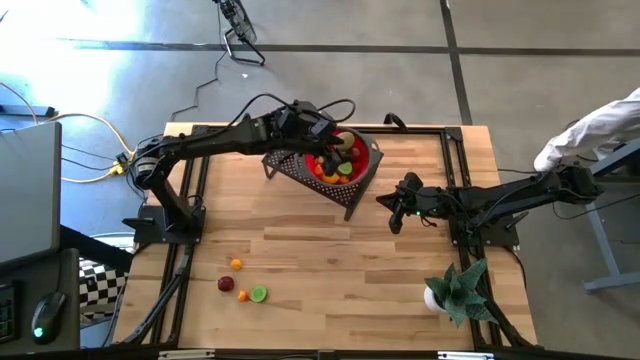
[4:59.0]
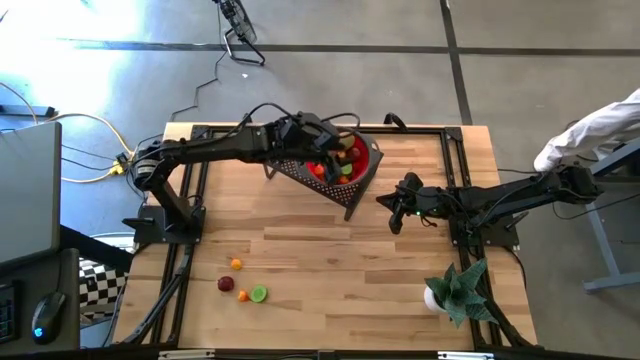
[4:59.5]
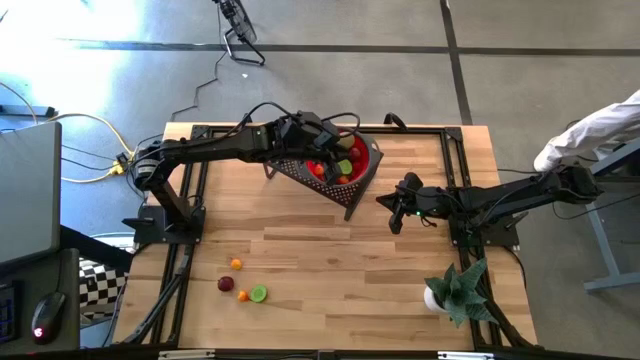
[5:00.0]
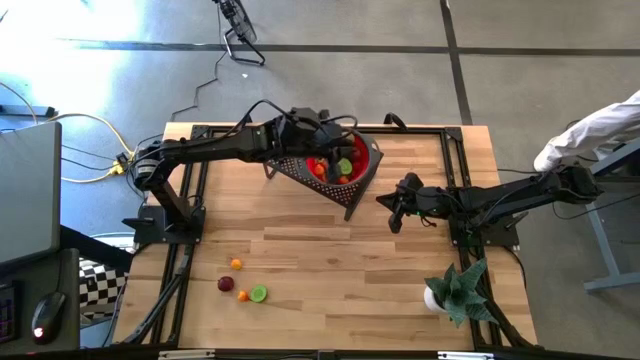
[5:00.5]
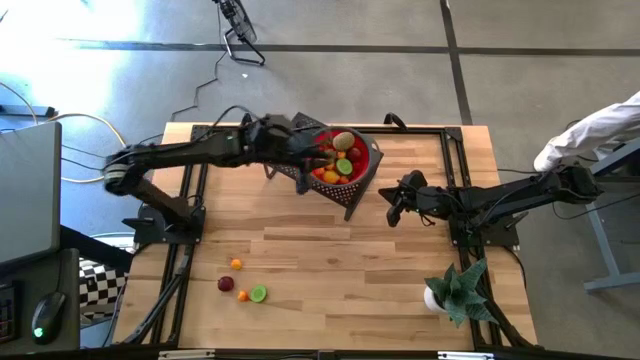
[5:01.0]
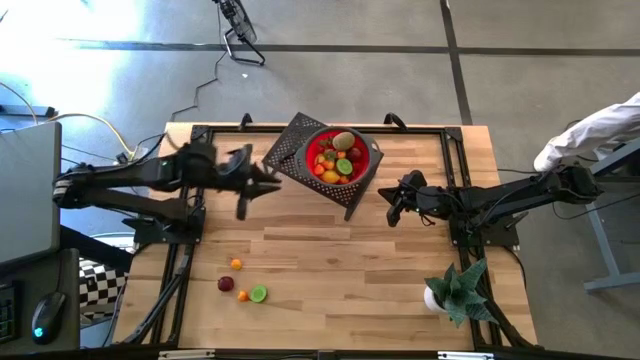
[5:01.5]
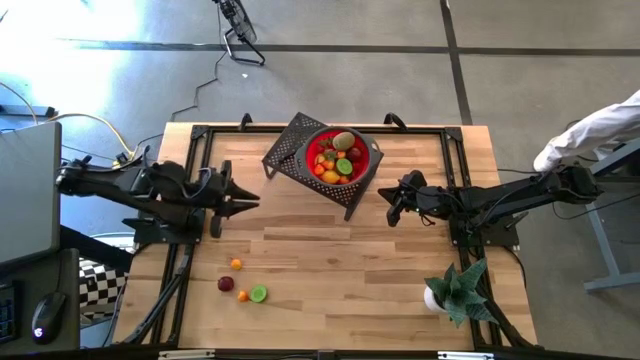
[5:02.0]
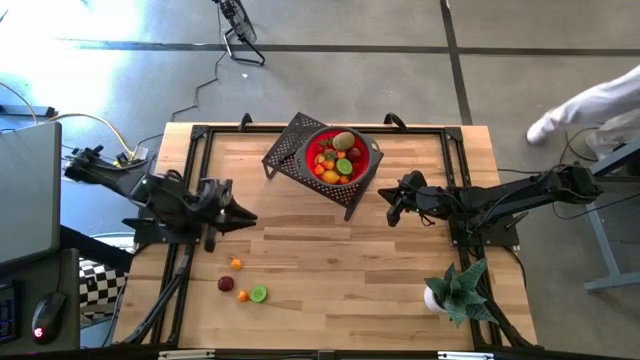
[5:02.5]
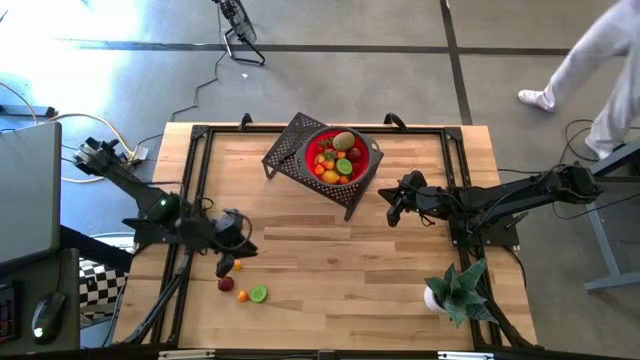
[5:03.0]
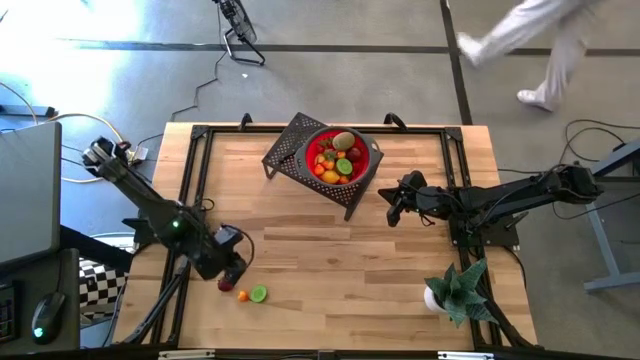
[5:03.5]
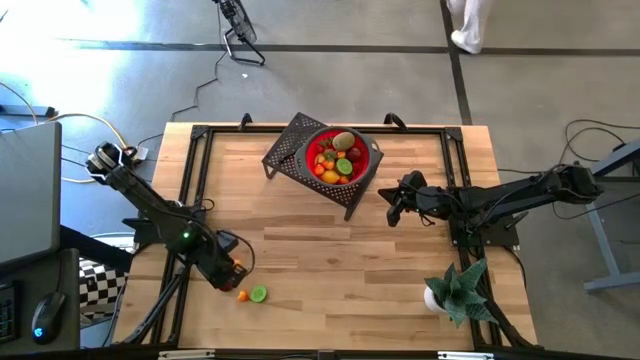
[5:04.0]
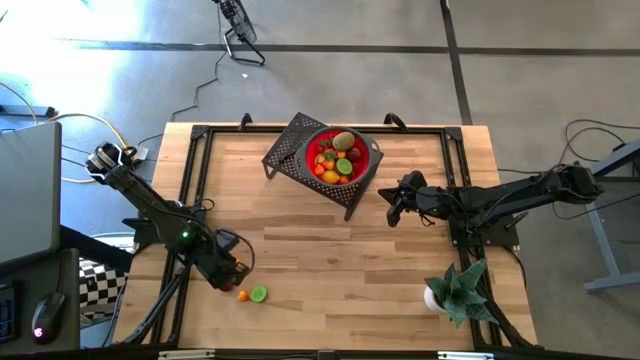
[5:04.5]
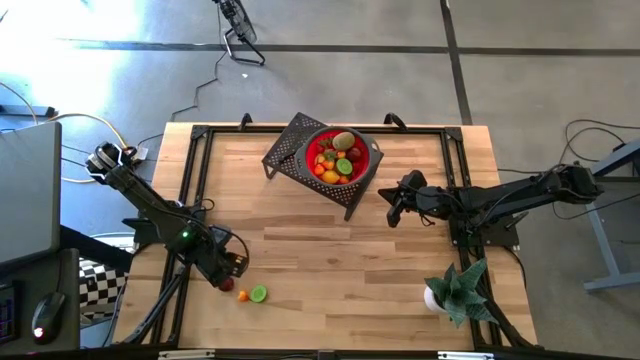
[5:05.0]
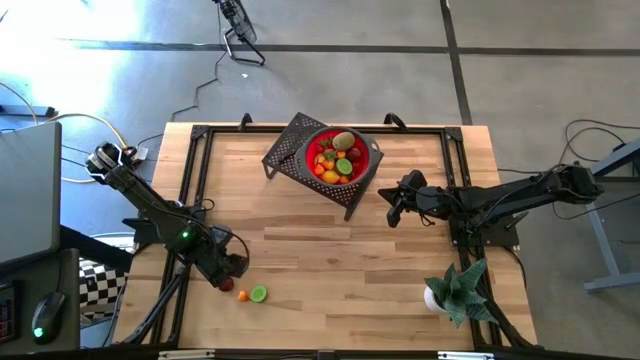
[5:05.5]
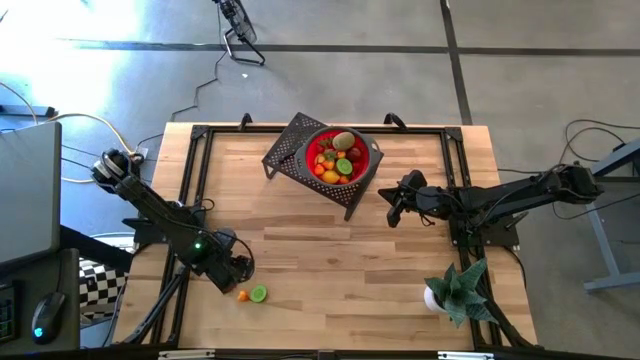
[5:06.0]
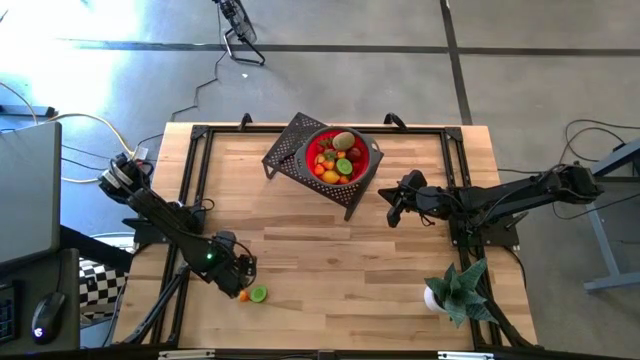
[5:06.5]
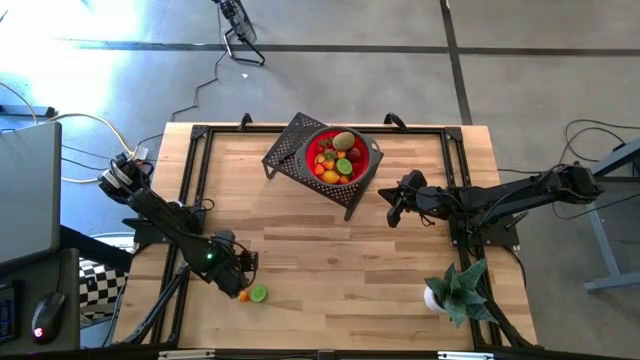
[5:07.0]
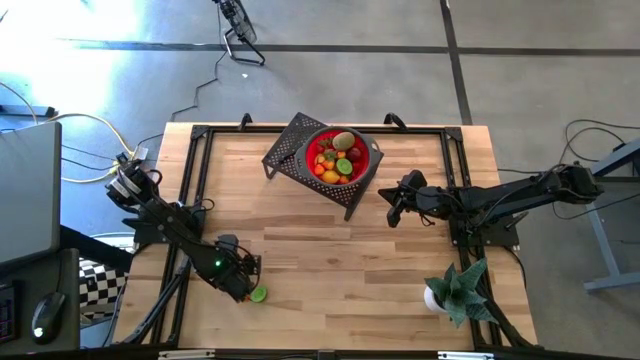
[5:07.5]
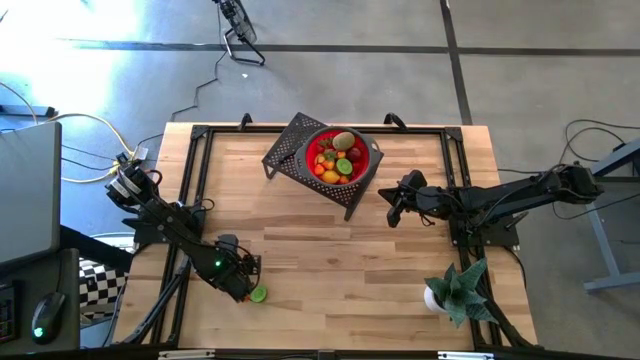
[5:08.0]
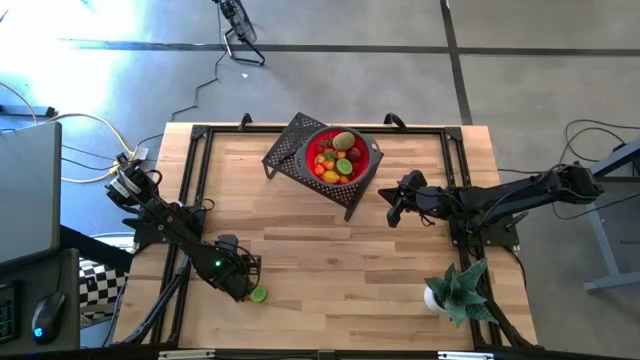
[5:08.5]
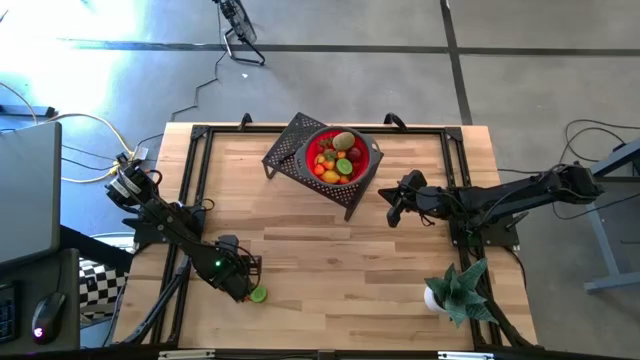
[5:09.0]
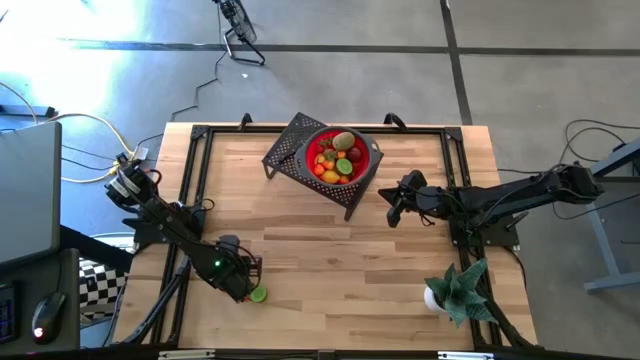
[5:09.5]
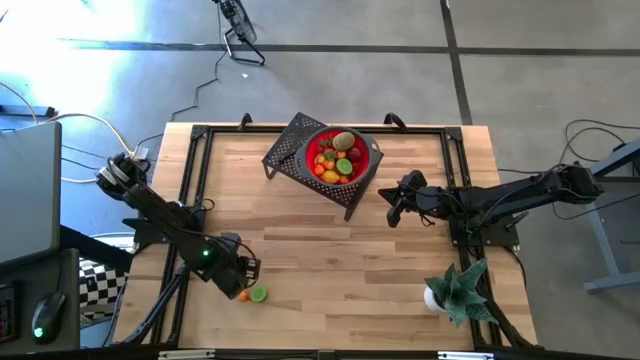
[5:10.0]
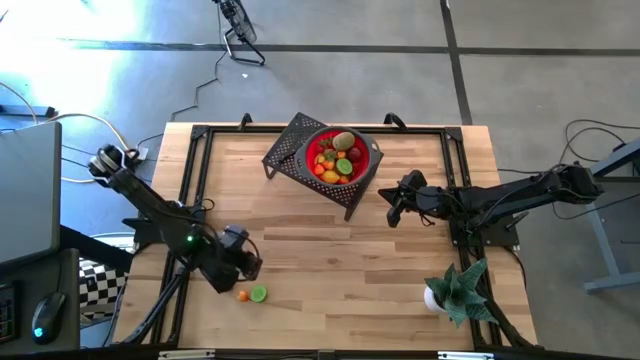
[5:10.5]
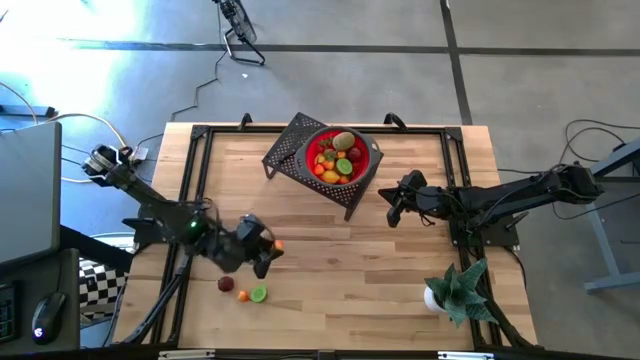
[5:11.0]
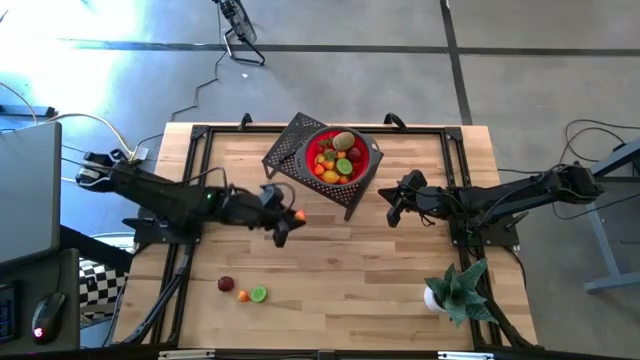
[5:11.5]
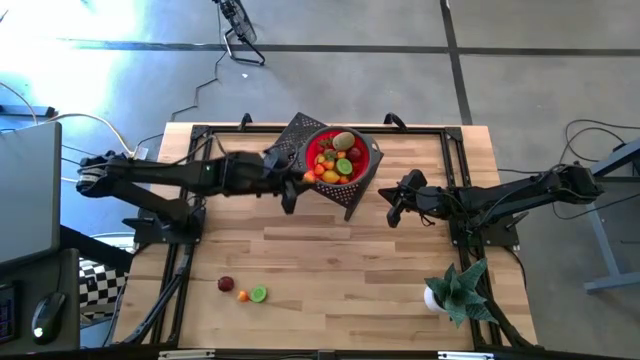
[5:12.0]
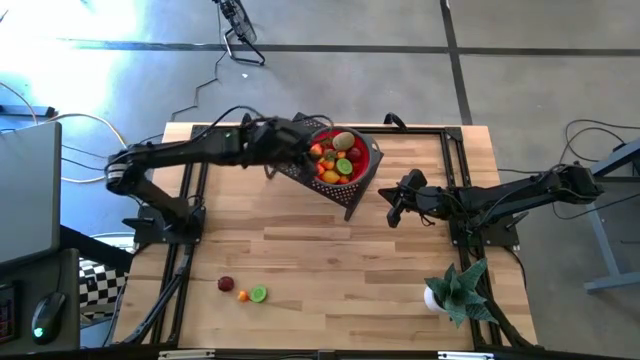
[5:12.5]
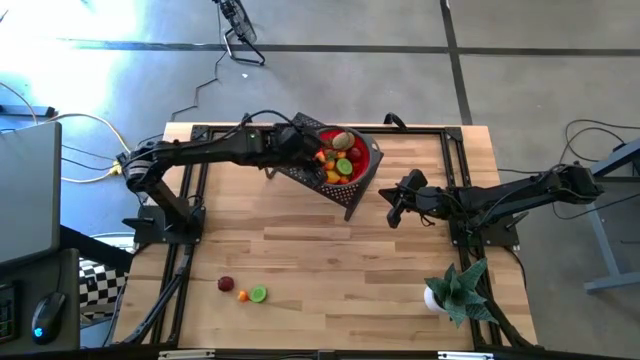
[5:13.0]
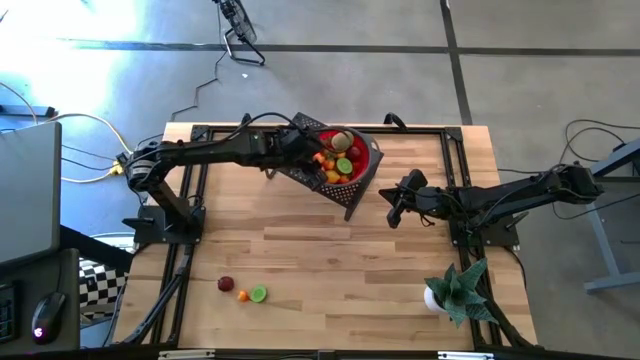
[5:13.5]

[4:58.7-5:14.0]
Task: Pick & Place Fruit
Put the pear into the strainer bowl on the shelf

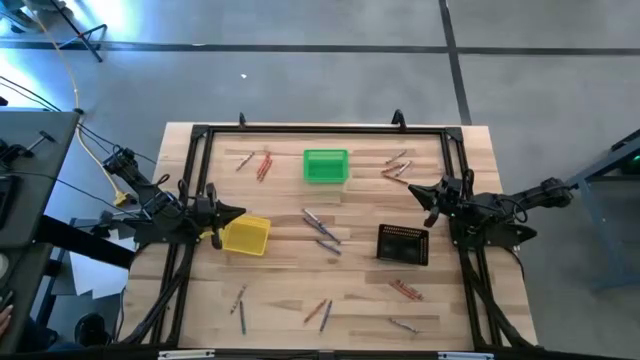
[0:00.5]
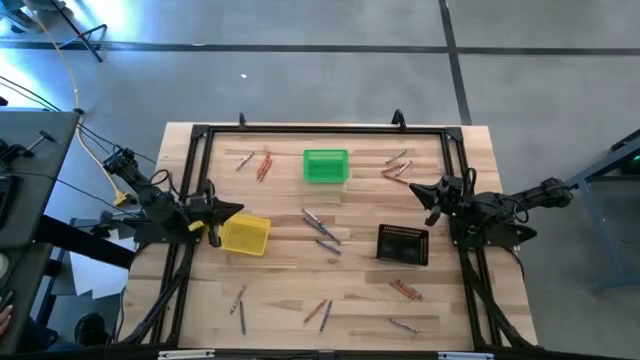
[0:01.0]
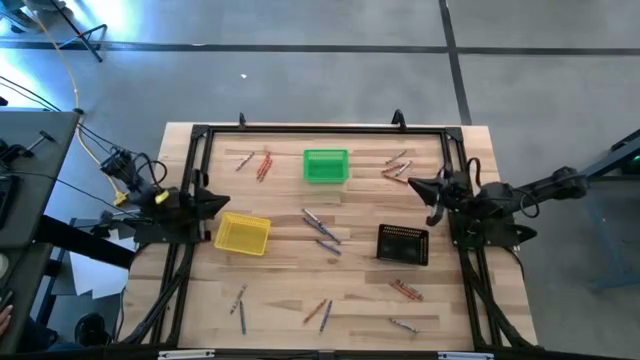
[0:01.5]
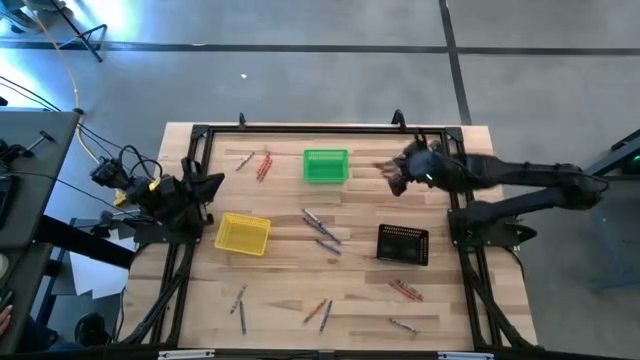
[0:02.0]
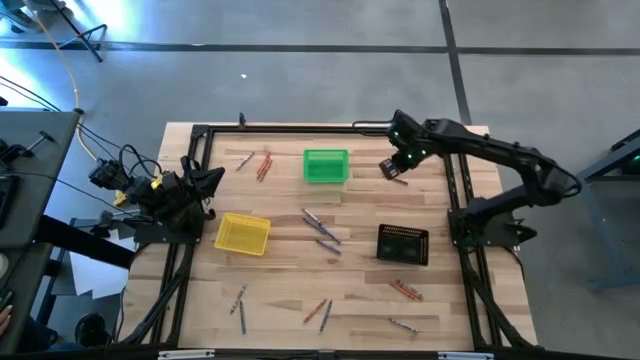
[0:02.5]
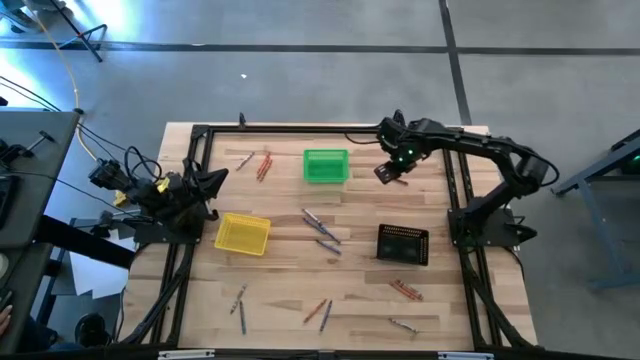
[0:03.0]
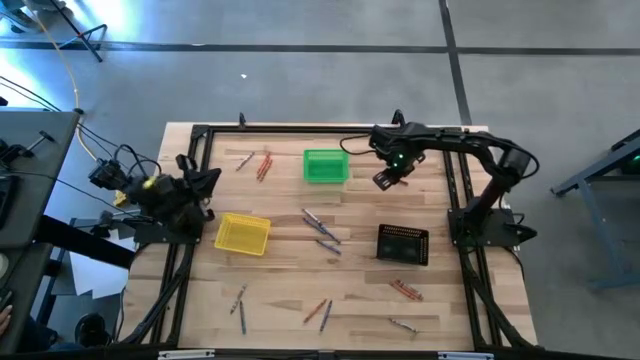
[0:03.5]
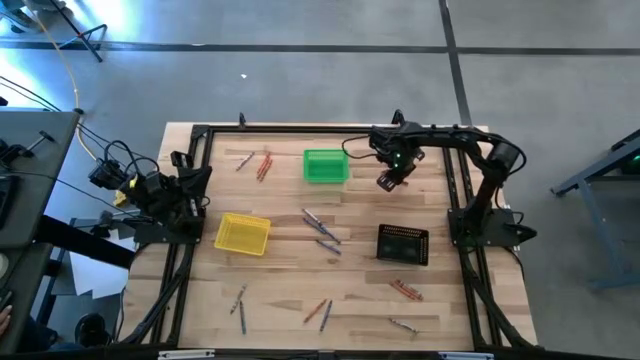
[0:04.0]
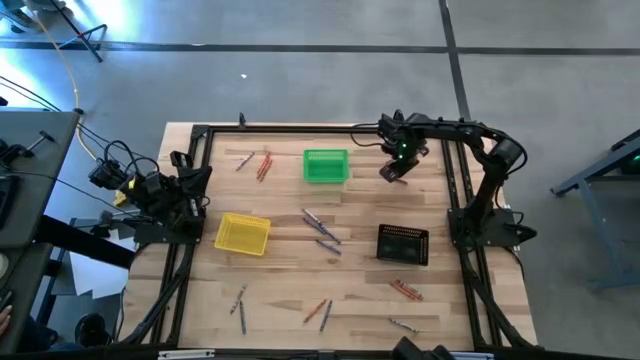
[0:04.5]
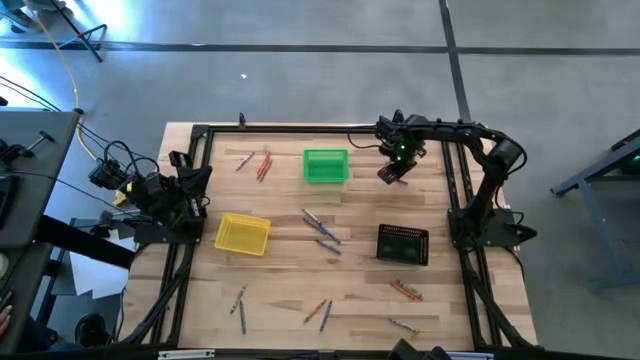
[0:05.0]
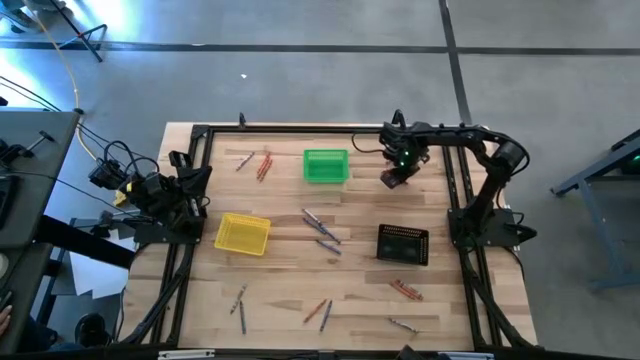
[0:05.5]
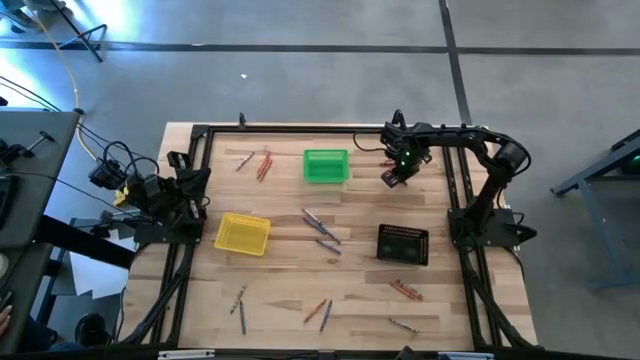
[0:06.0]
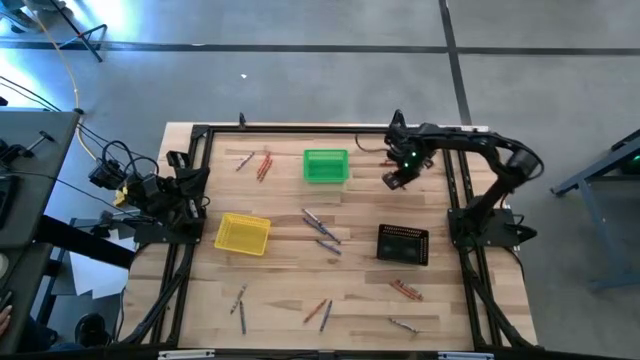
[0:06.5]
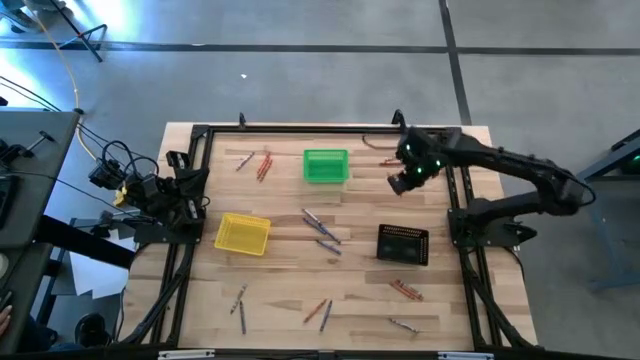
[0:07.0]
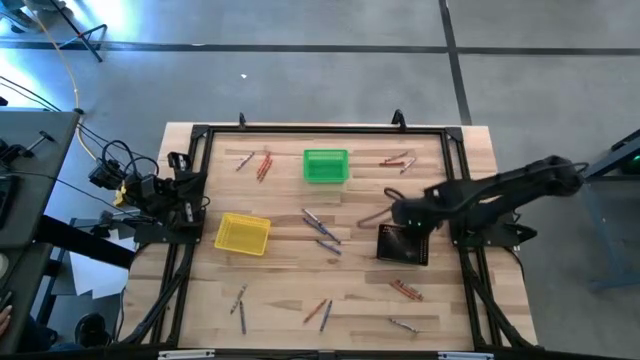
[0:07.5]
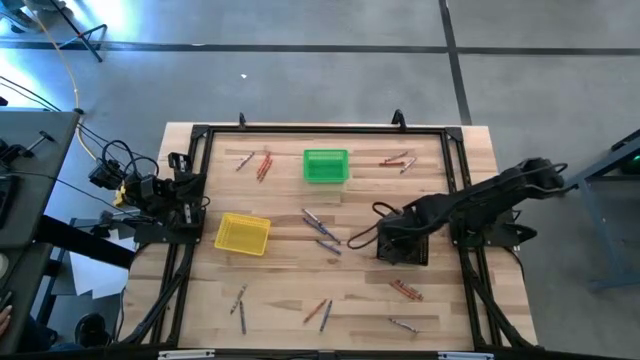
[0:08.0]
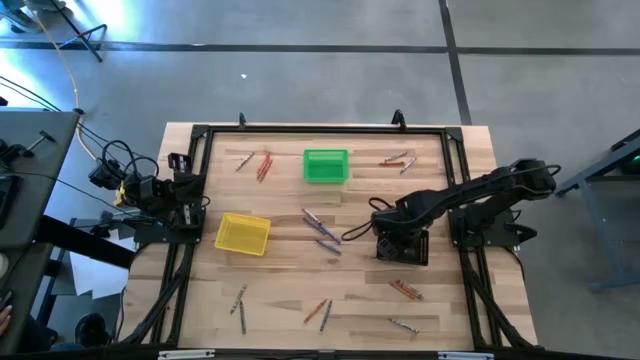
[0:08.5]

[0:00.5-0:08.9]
Task: Sort crayons
Put the orange crayon into the black basket
